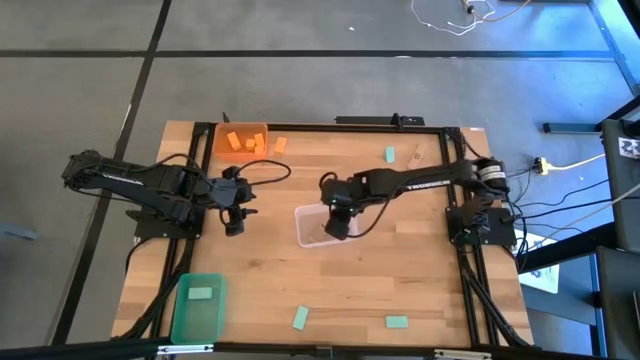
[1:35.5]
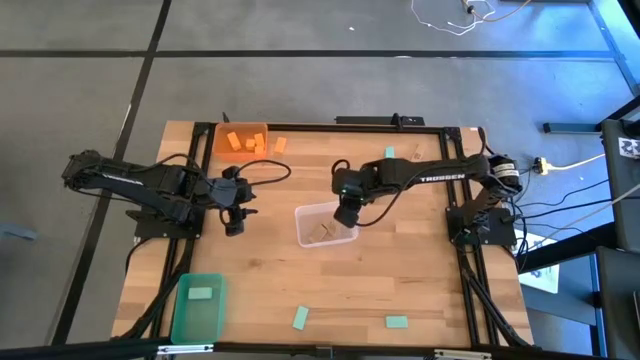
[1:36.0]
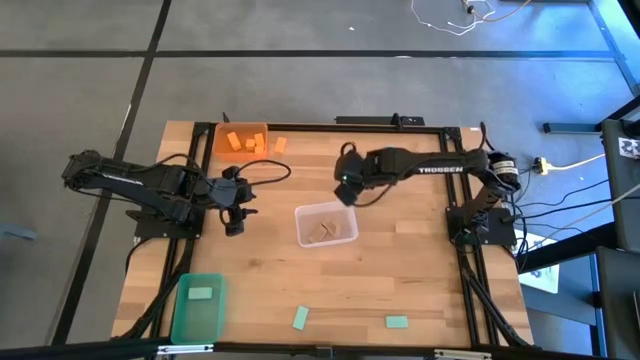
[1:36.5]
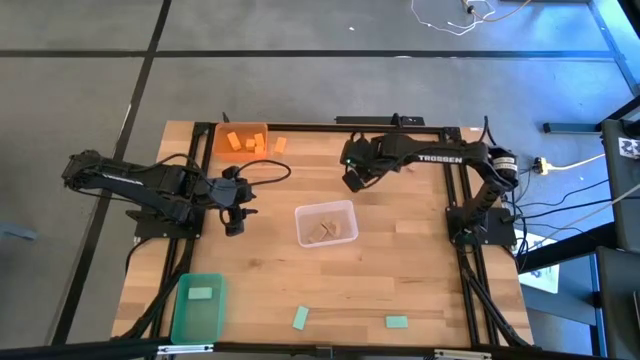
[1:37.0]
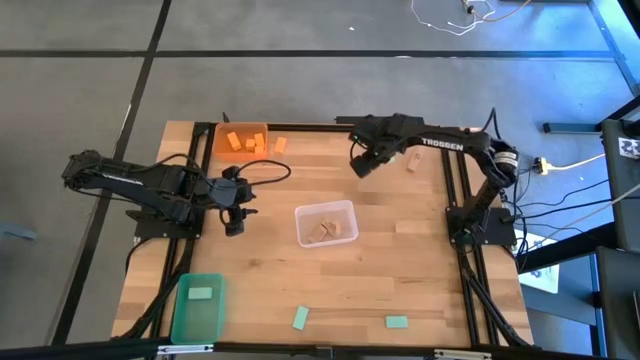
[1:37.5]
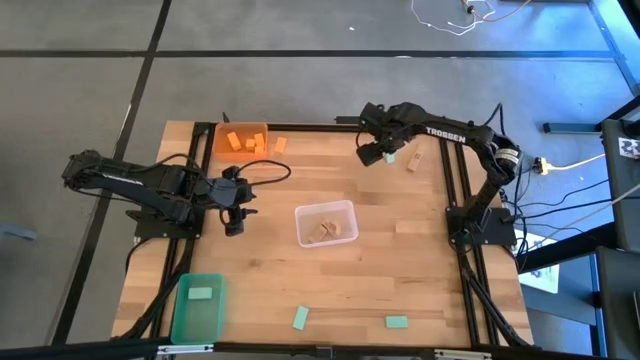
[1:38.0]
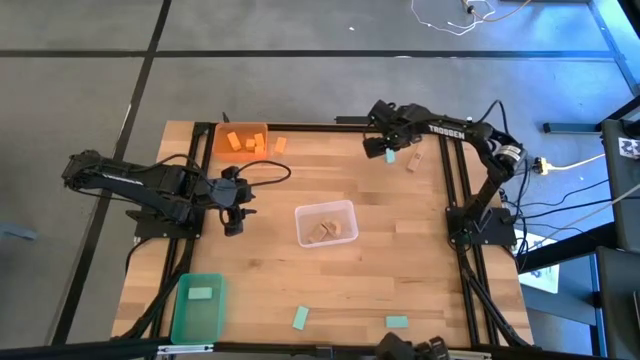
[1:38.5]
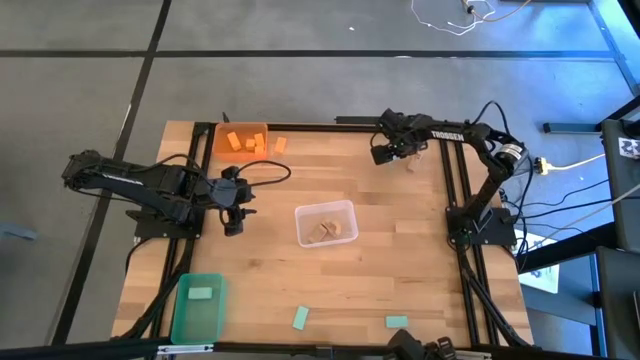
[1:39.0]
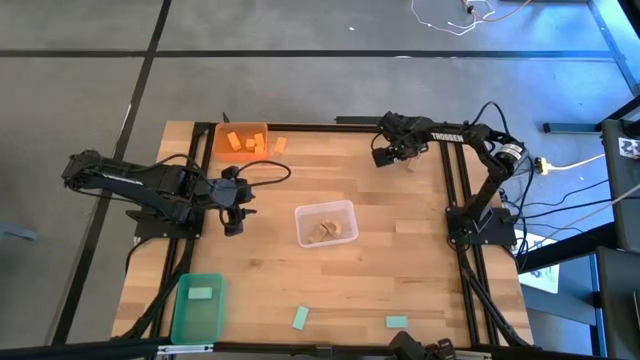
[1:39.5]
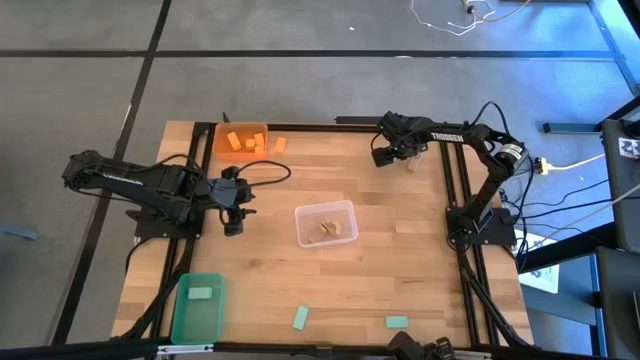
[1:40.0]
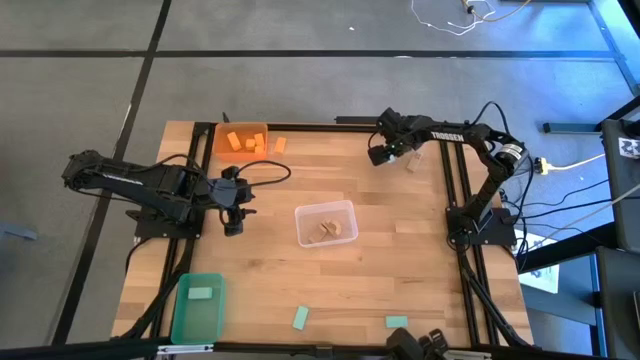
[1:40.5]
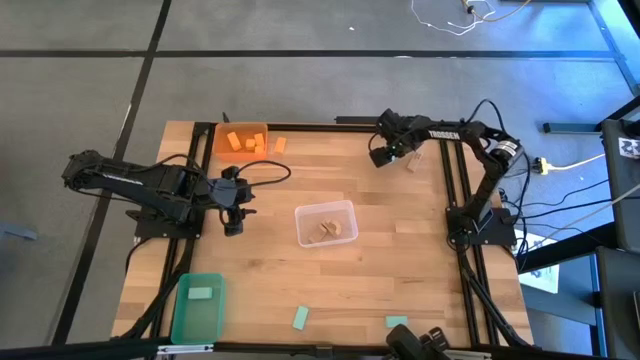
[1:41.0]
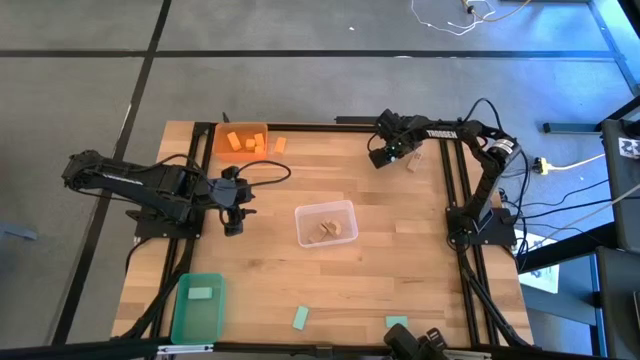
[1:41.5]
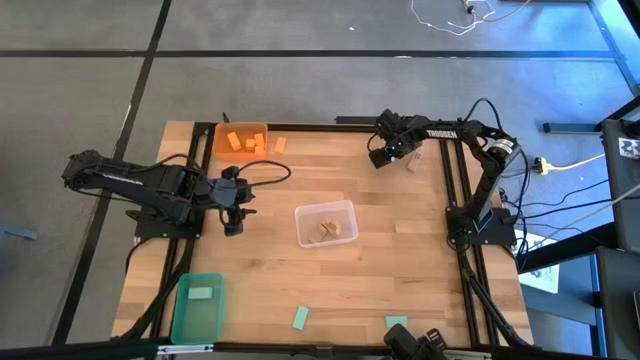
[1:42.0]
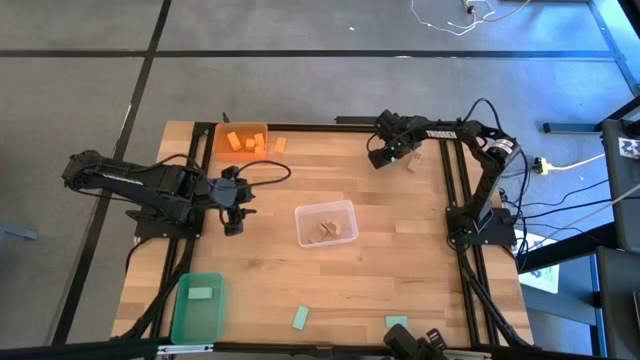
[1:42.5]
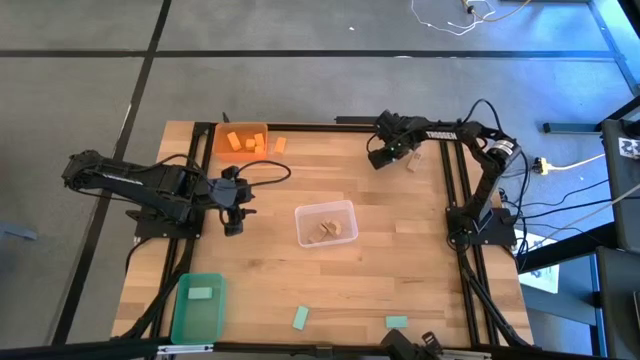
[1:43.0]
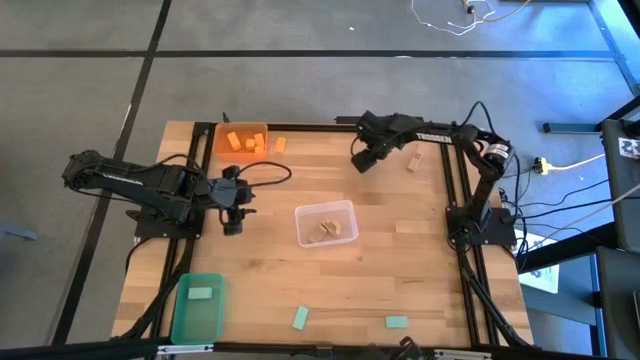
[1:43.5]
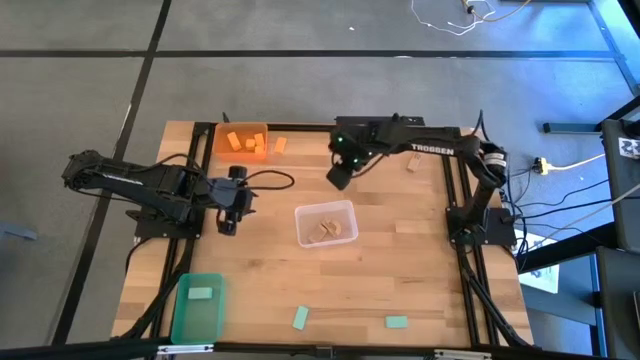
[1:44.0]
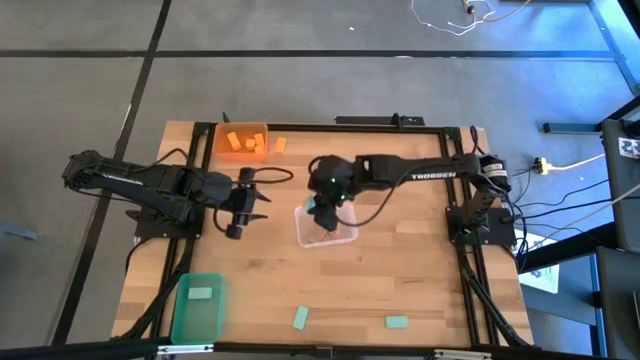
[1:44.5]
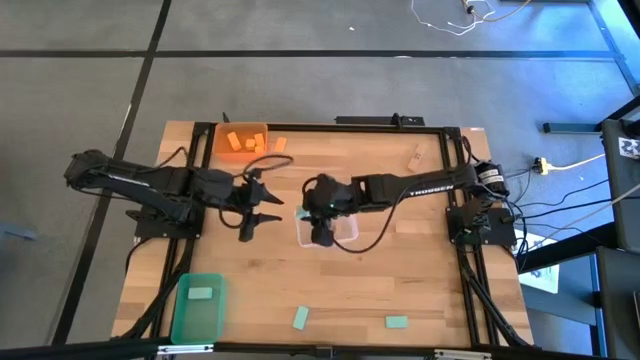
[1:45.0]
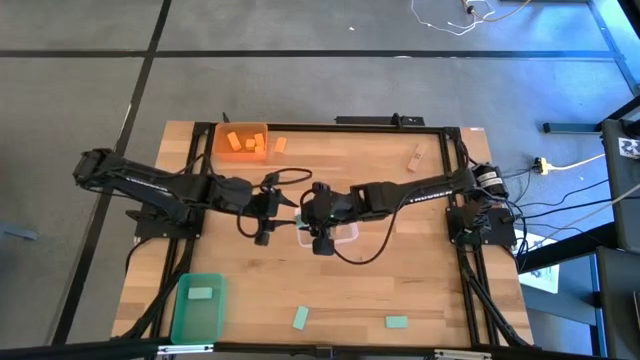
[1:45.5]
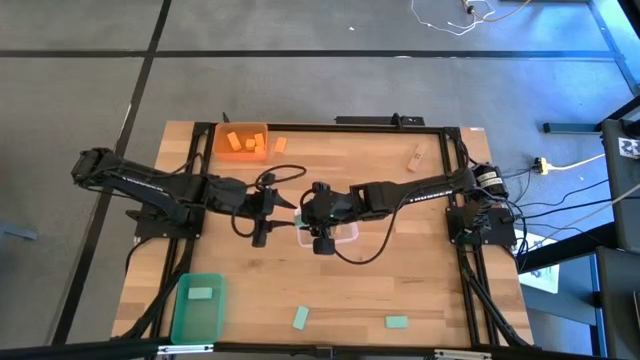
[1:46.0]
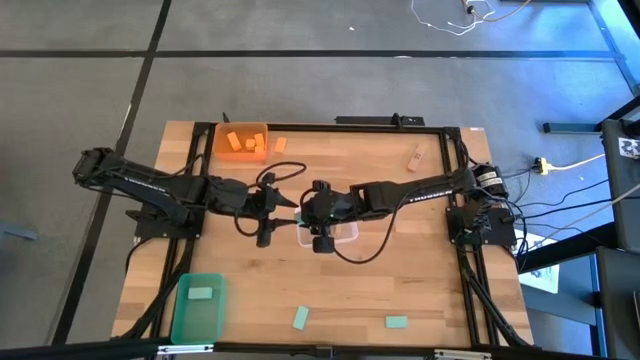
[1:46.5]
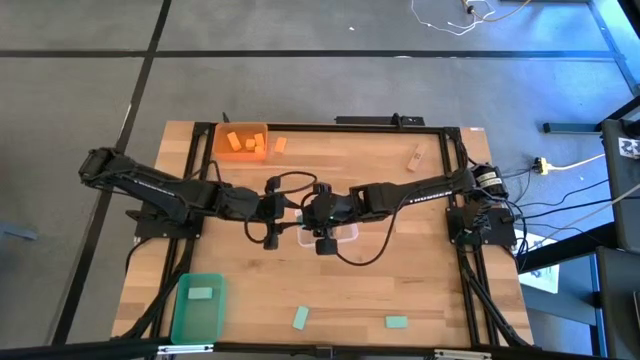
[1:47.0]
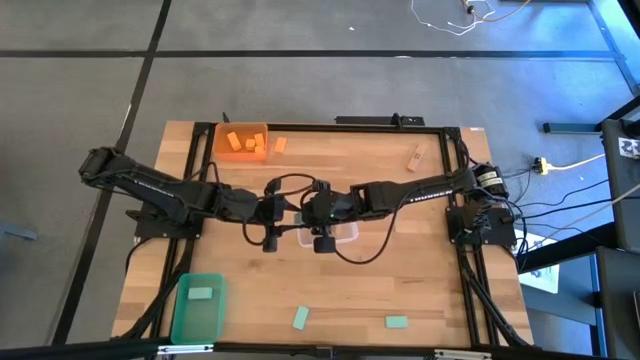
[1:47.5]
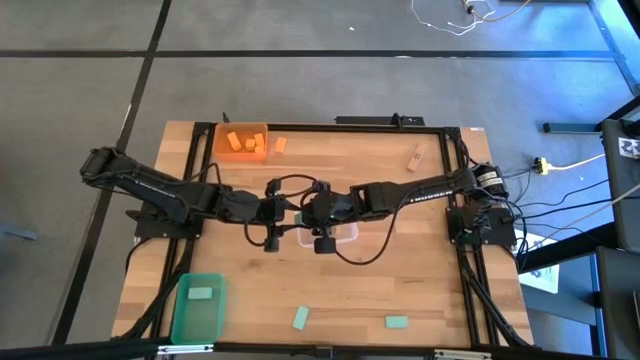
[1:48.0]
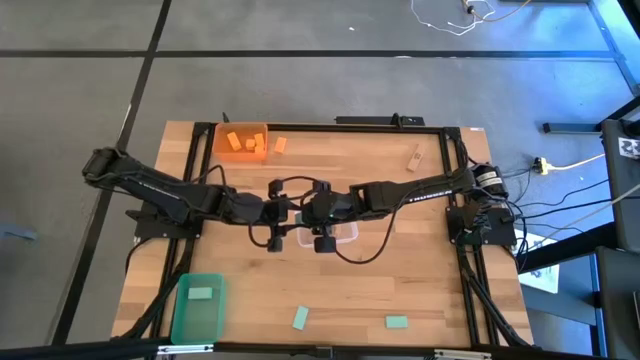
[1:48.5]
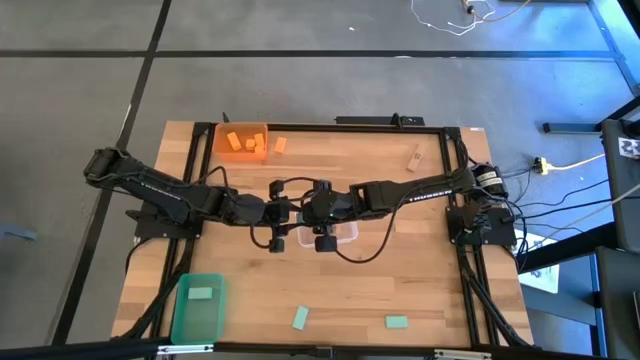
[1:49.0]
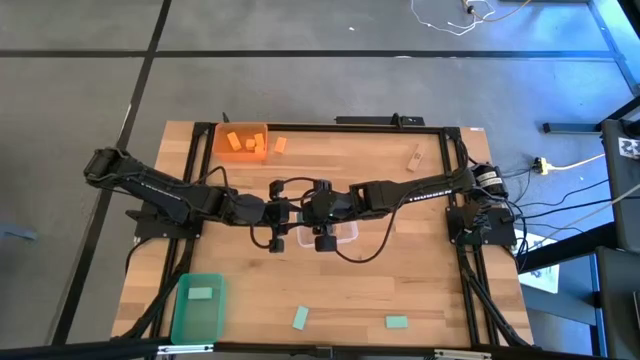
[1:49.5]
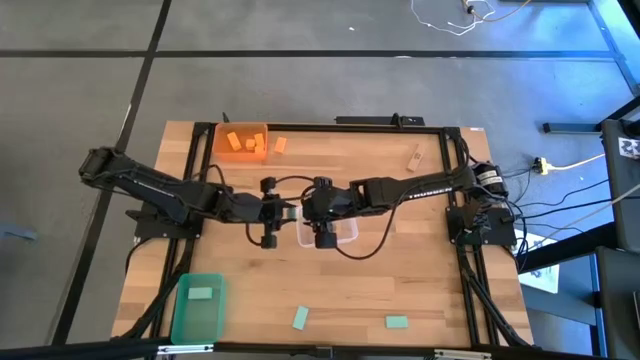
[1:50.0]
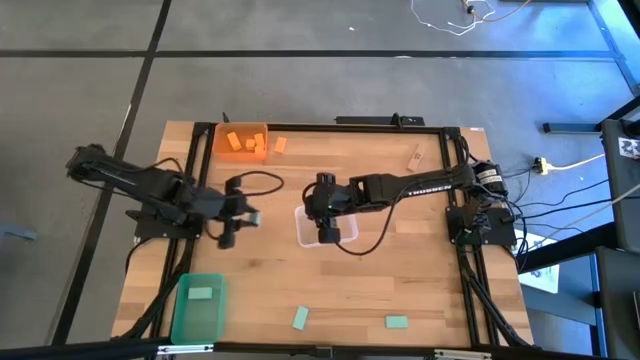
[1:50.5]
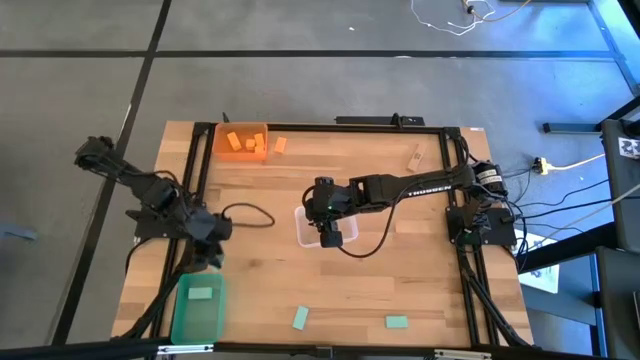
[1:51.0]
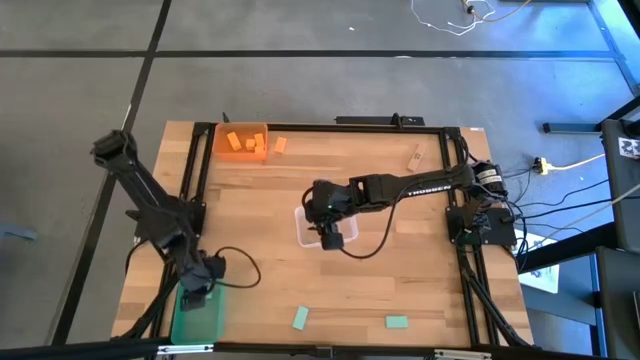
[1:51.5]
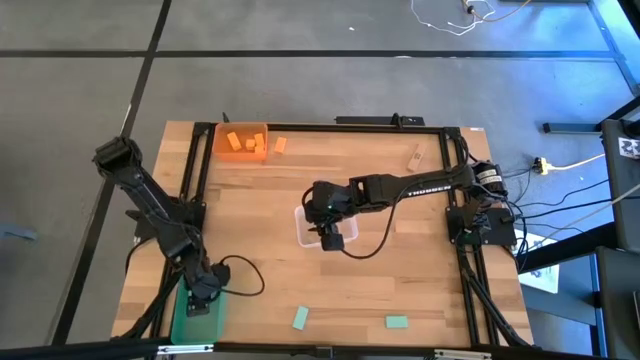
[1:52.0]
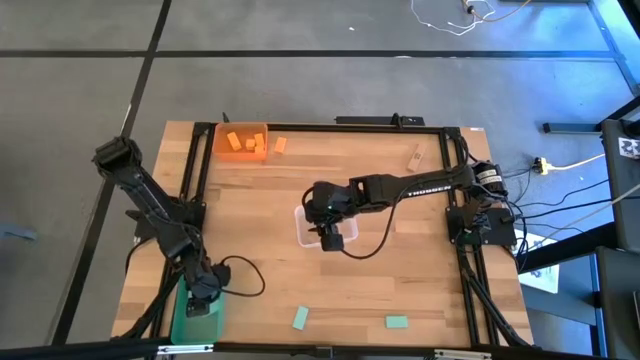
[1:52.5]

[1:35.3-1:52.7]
Task: Sort & place blocks by color
Put the blue block into the green bin

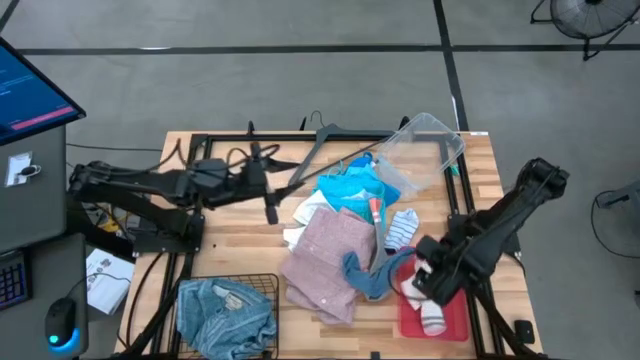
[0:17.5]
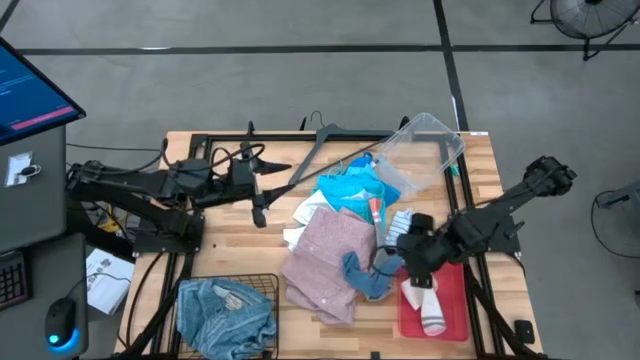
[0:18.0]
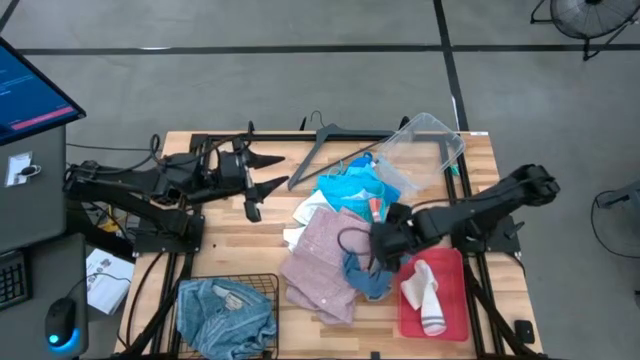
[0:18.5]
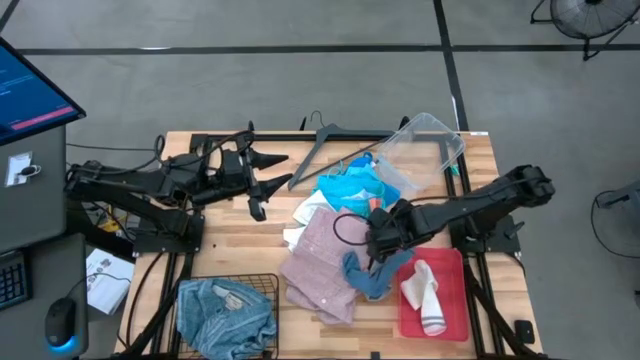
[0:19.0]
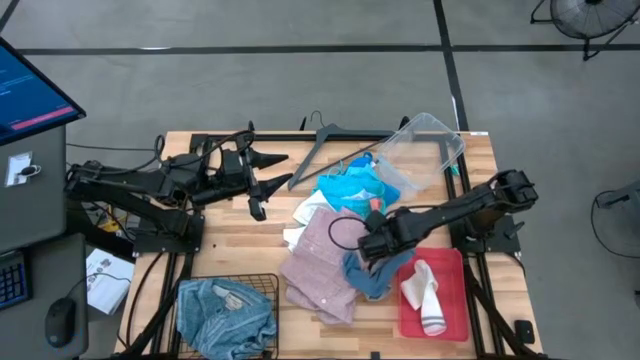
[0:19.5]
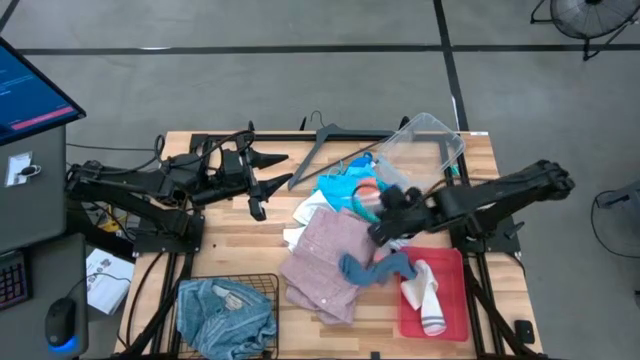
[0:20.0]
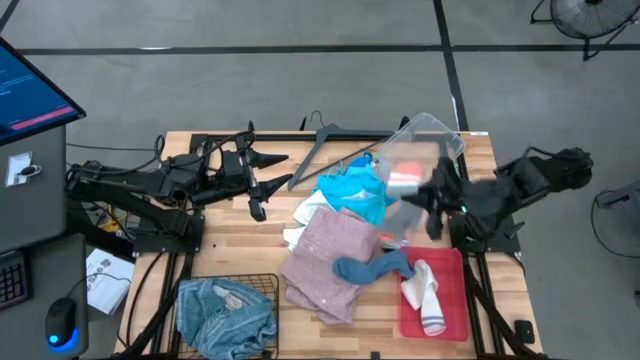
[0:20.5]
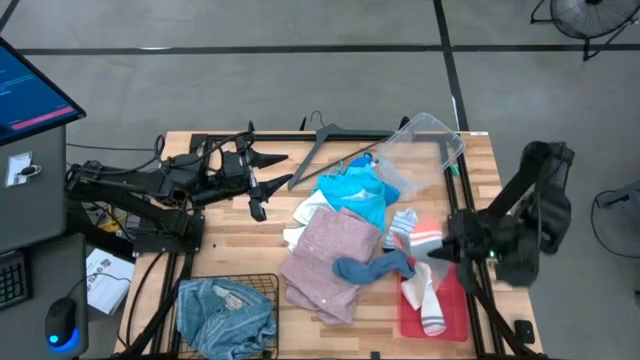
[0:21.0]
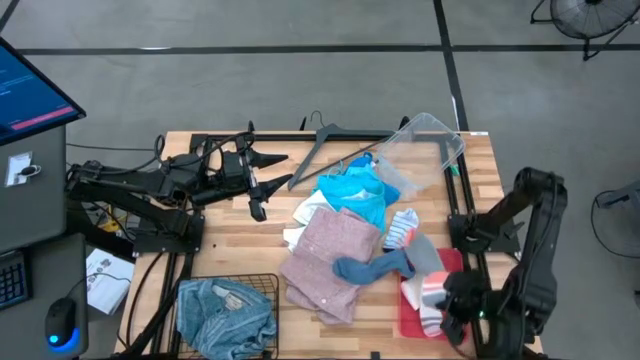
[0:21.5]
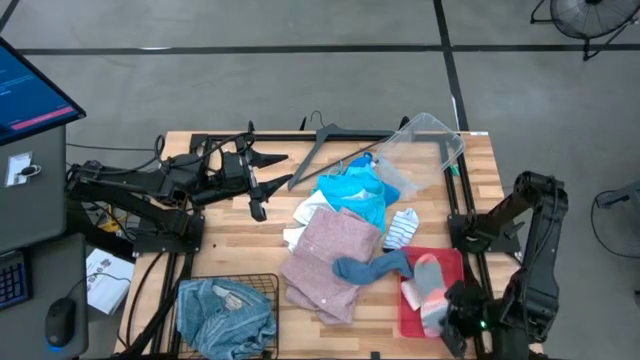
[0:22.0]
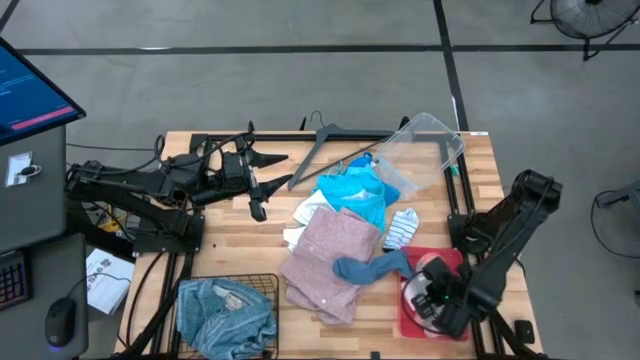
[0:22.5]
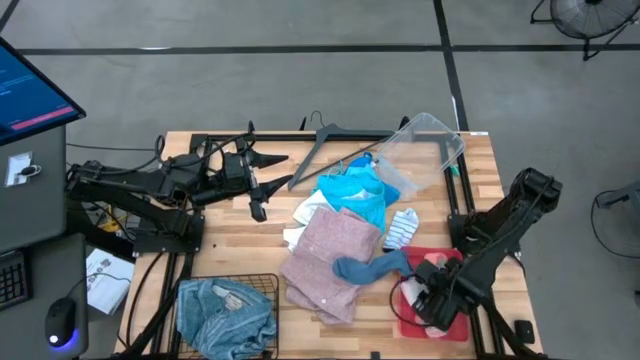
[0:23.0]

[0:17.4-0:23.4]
Task: Pick & Place Cloths
Put the pink and gray sock into the red bin
